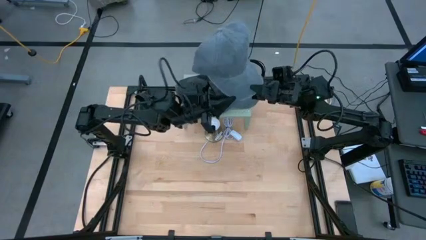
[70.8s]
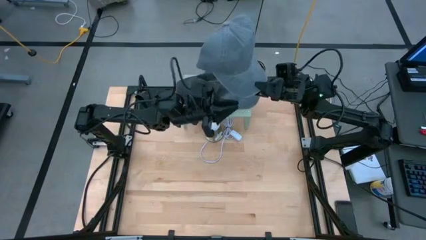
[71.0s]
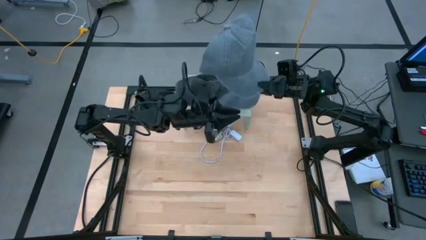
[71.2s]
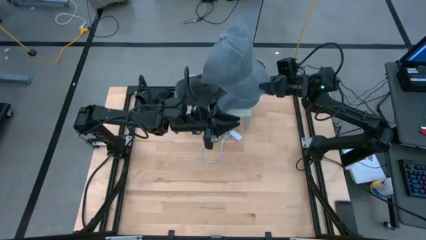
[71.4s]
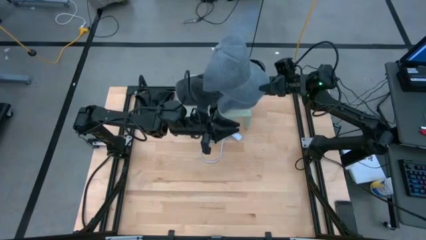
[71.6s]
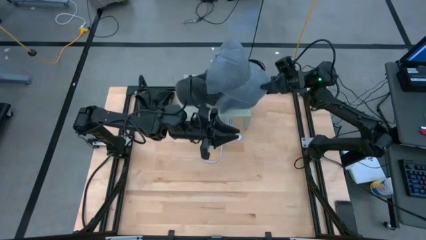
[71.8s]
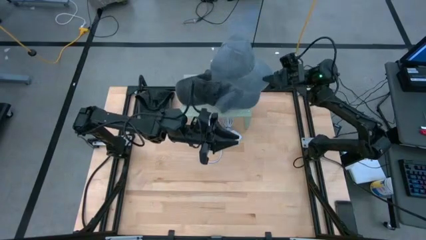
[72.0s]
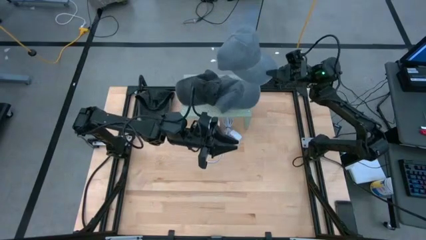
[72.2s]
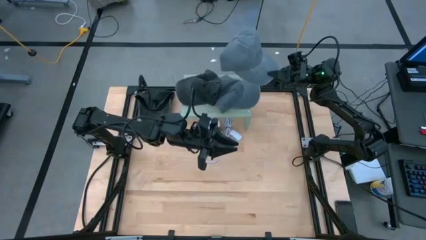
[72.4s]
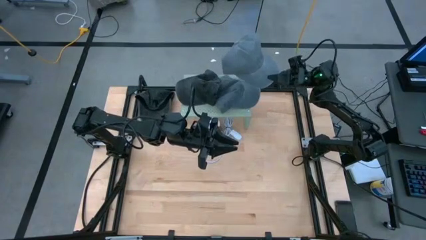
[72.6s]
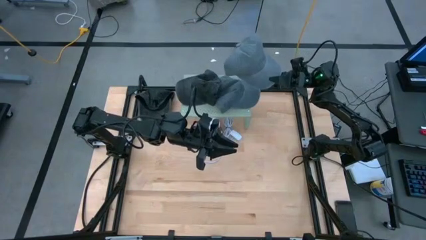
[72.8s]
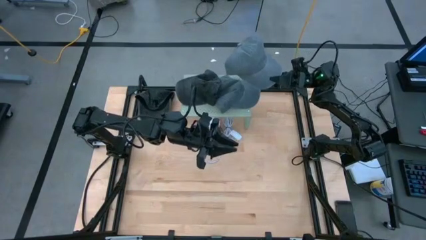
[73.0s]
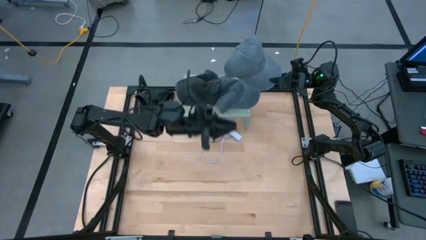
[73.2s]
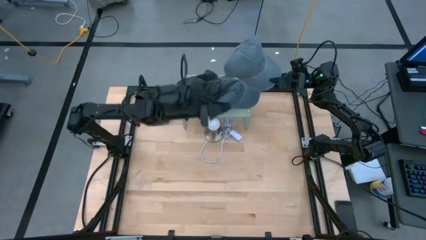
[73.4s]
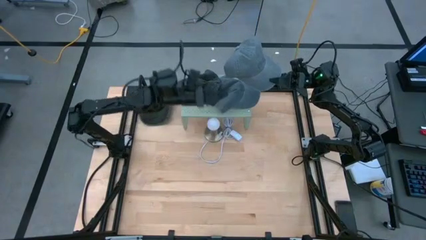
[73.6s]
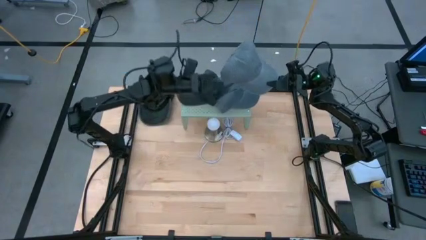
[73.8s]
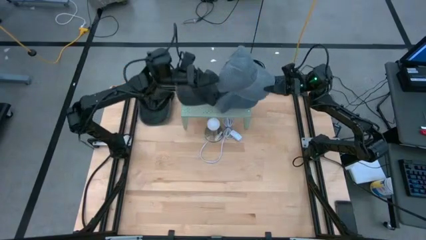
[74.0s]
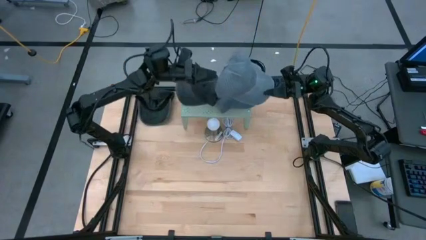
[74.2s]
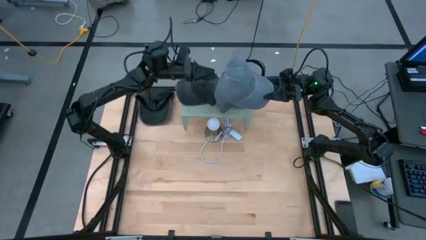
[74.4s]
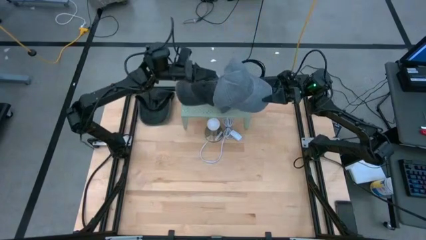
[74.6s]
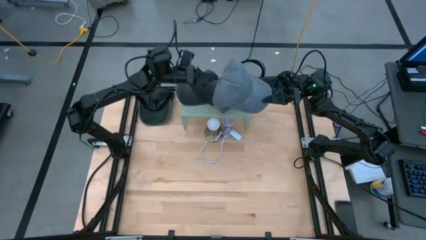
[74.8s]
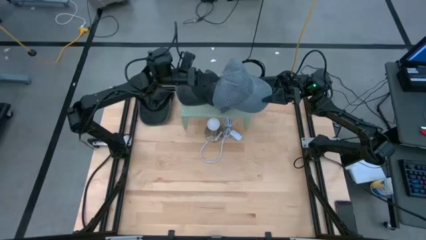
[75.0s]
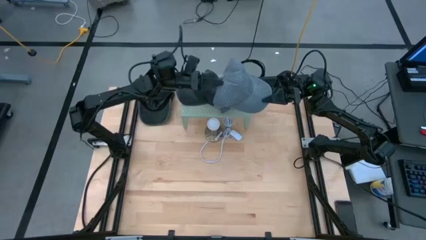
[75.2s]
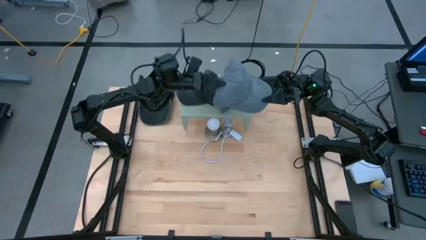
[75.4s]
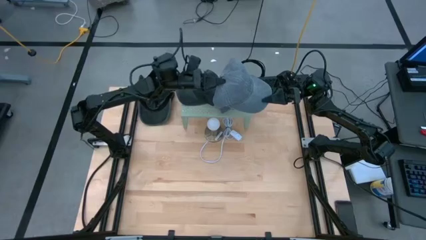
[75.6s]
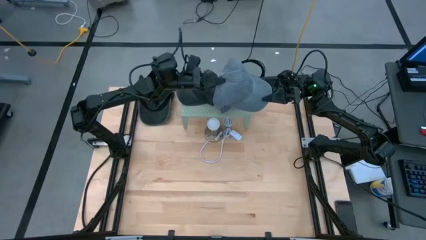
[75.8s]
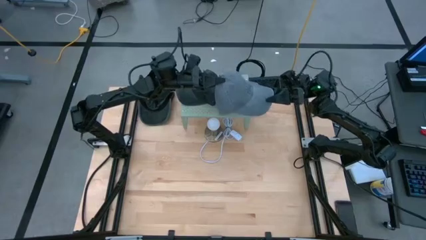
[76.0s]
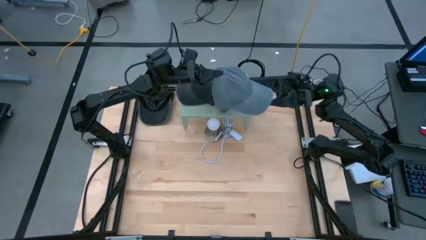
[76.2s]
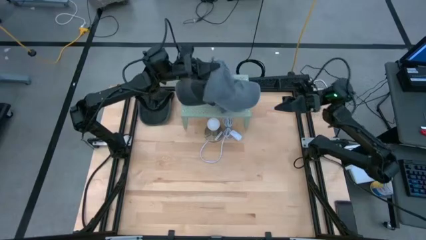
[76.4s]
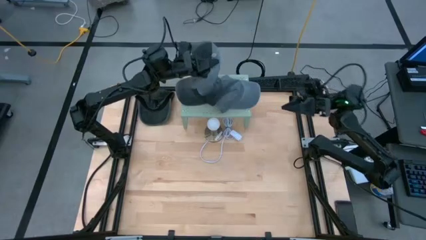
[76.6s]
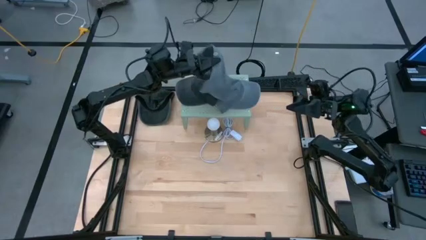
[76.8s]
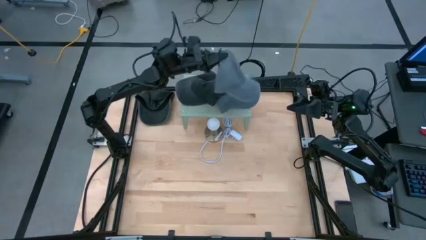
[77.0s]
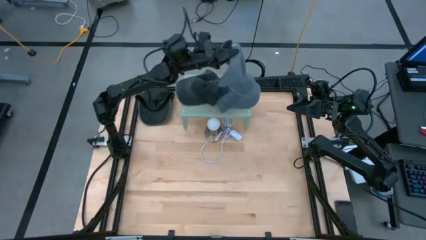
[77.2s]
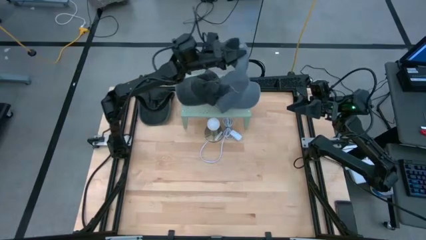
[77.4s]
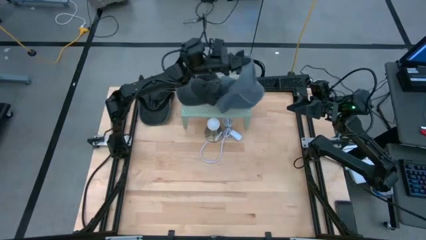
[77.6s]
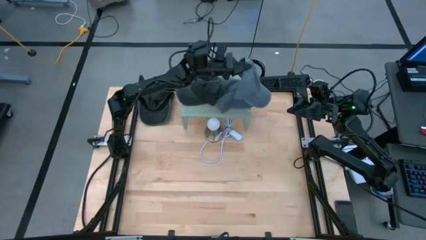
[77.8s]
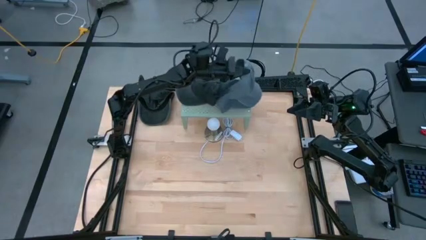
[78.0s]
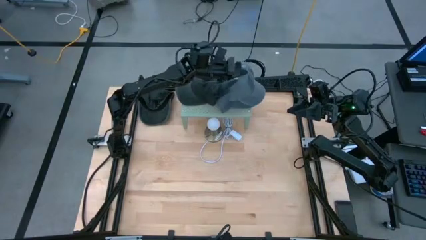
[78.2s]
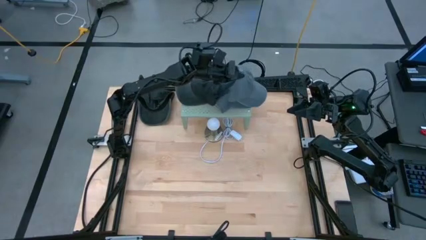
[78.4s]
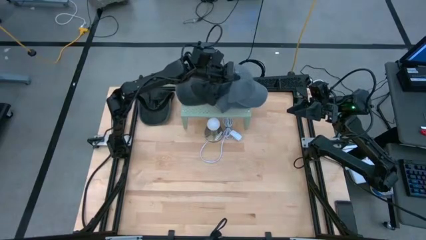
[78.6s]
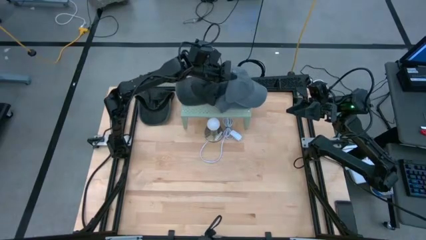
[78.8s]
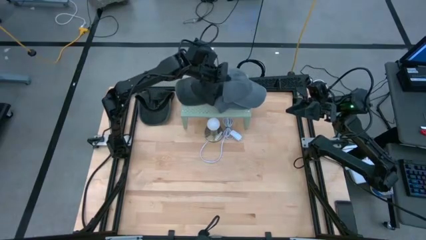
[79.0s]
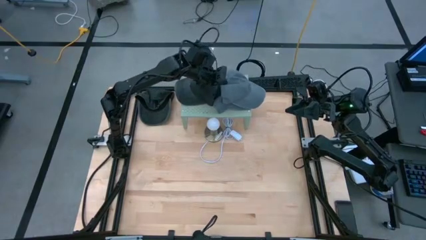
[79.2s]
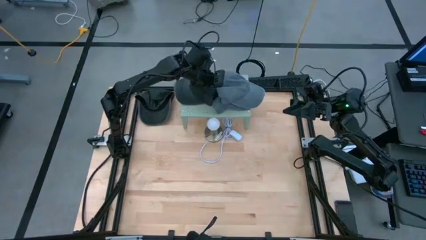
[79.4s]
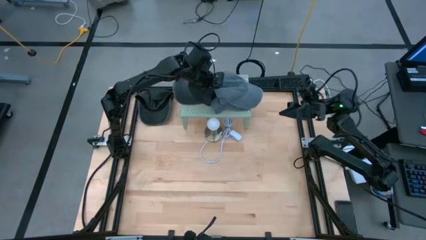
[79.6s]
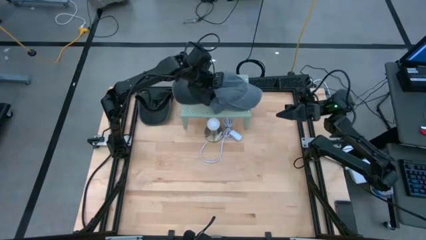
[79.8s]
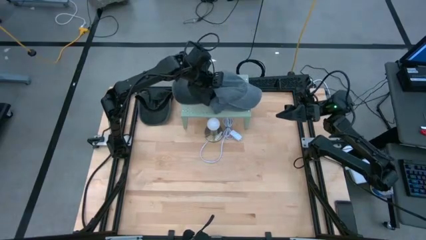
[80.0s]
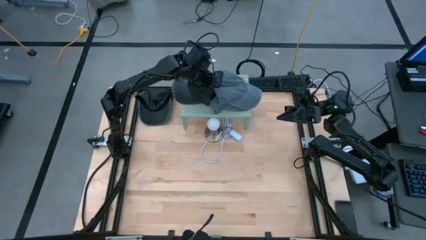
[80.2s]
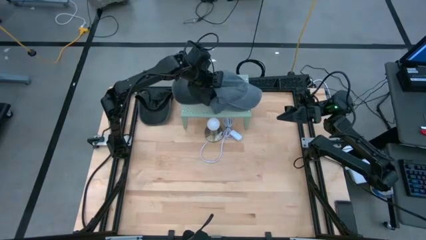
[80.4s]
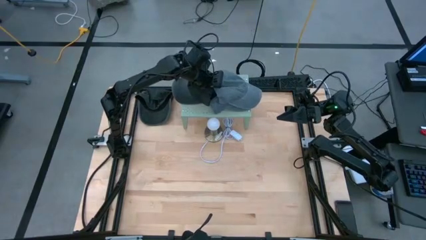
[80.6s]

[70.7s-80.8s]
Task: Pick & Place hat
Stack the gray cap on the other gray cap on the shelf

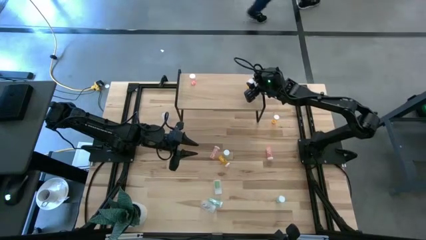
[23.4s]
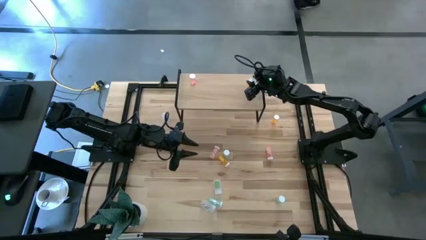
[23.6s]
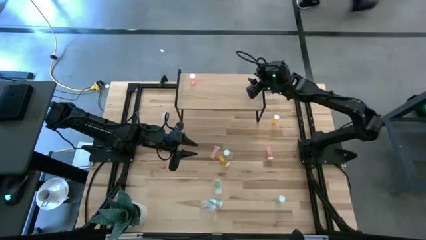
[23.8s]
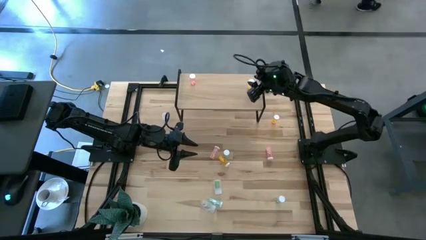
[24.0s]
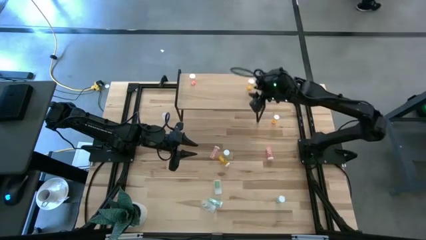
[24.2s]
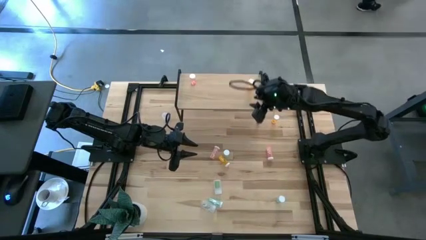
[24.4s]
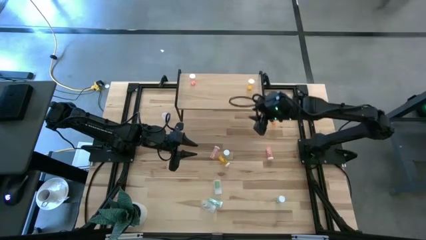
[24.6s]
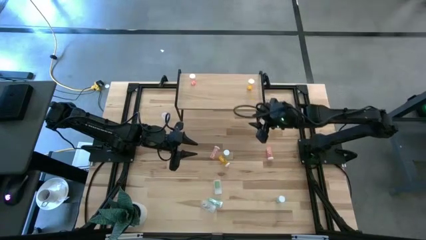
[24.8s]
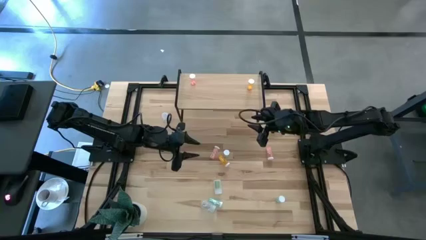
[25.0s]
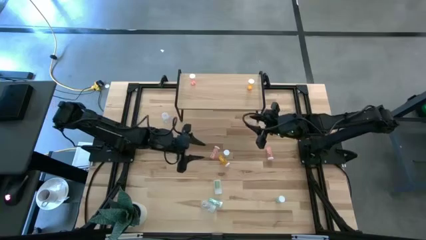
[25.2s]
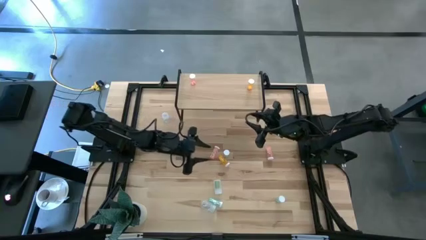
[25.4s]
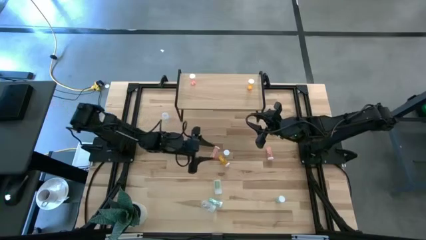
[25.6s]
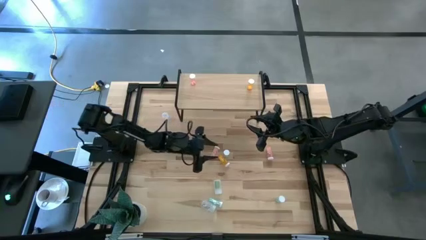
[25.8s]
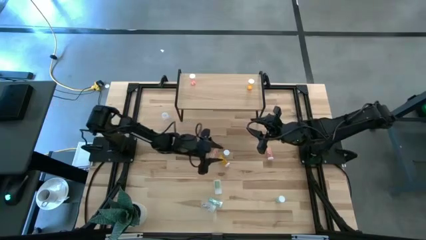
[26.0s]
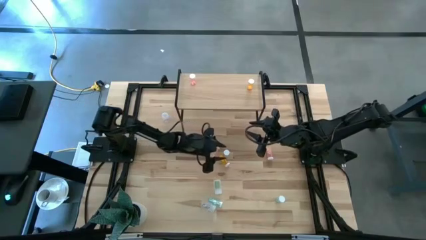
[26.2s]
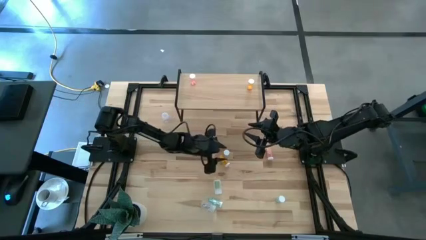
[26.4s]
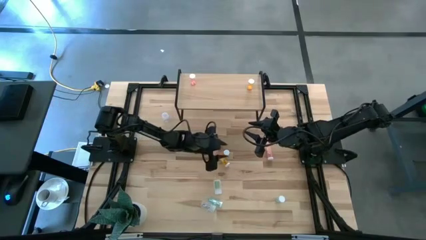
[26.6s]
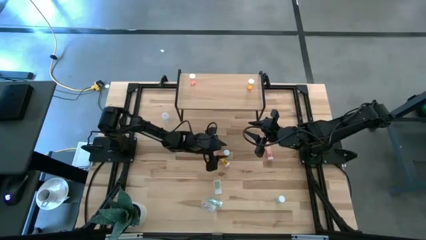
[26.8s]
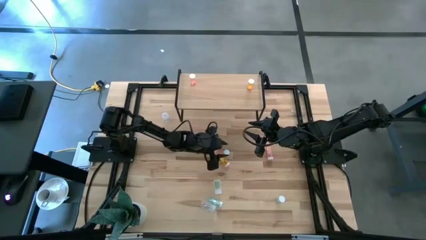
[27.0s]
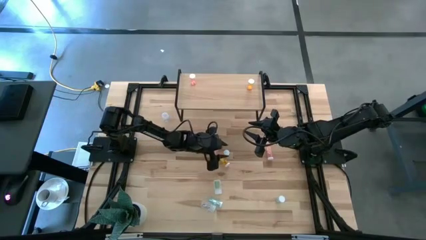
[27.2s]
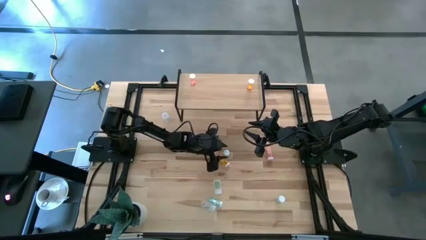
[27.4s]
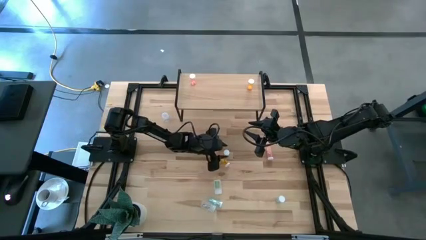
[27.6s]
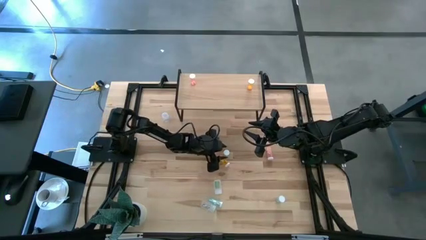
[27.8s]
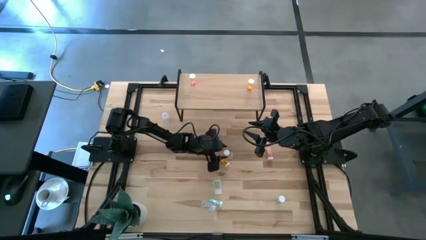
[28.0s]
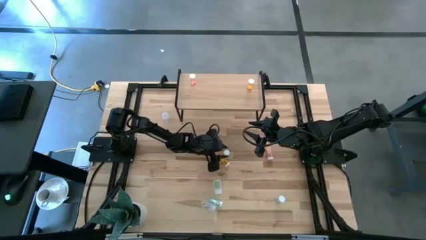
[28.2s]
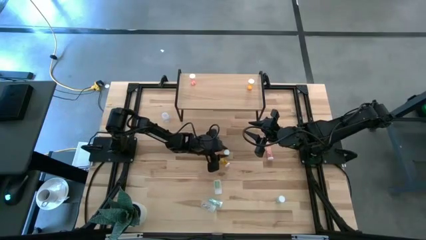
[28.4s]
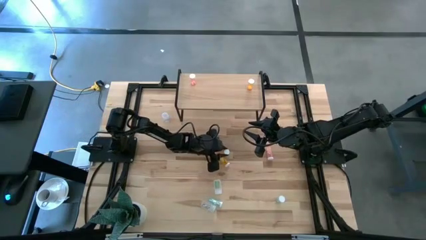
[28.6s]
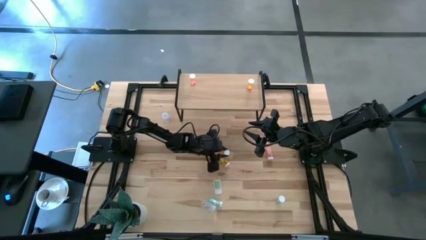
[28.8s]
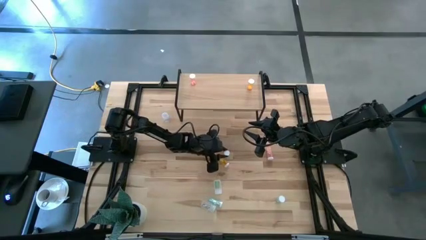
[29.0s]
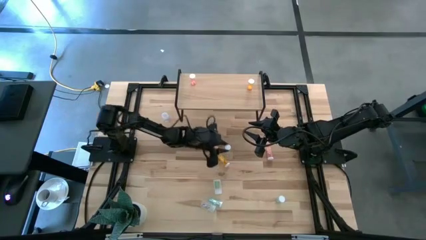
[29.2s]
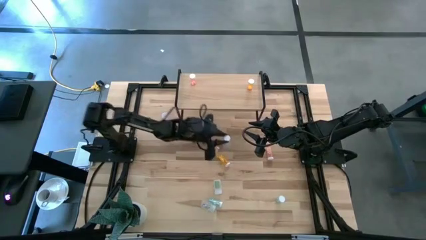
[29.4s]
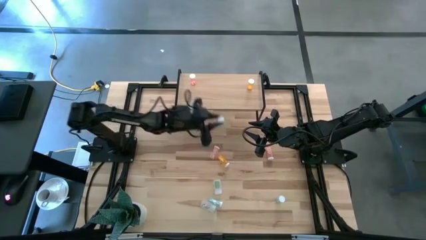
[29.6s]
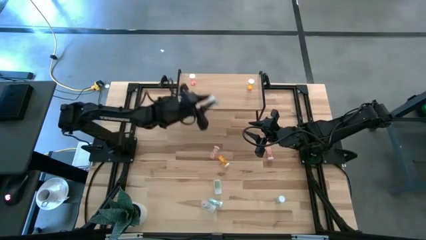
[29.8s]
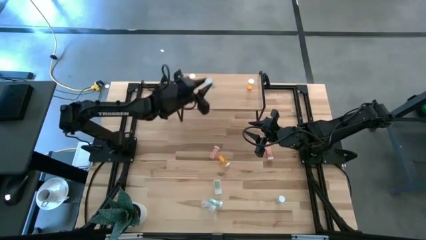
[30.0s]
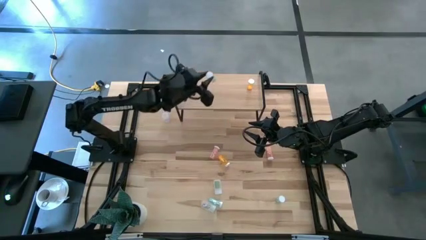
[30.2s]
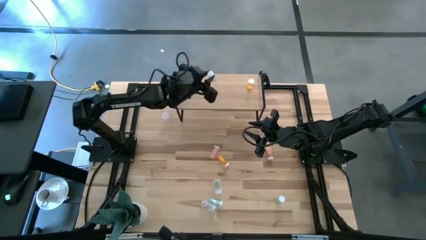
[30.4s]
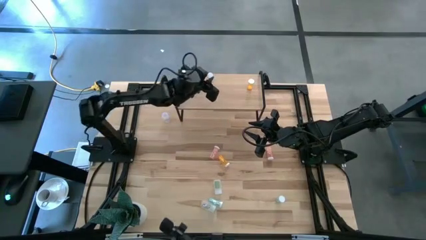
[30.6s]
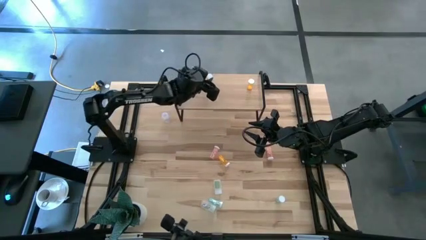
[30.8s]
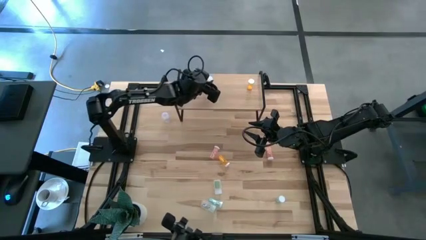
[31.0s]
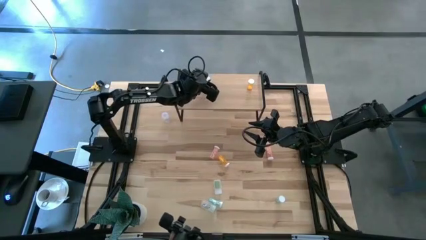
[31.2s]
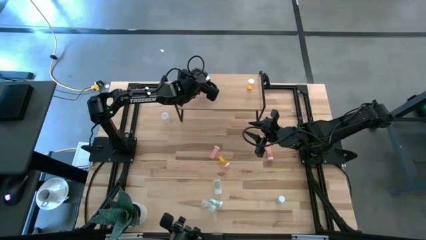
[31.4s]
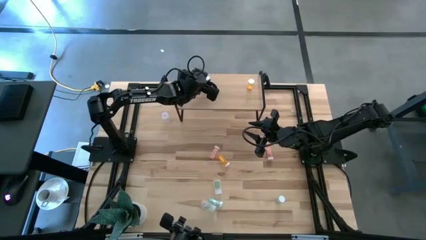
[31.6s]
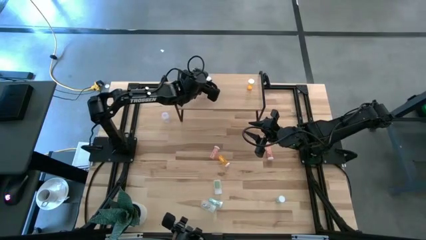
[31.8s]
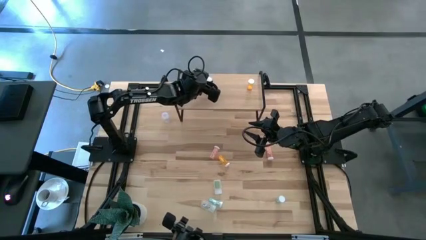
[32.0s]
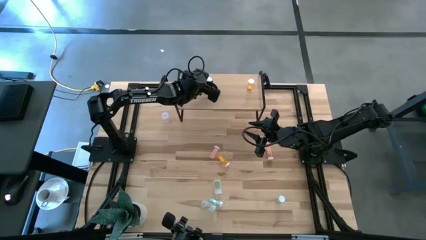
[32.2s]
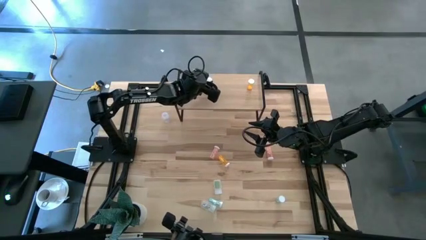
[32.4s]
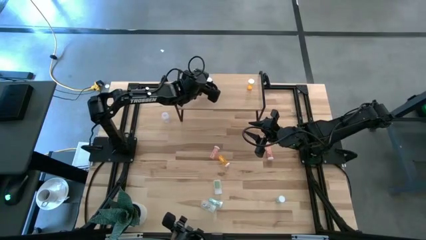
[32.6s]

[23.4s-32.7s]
Task: Pick and place medicine bottles onto shelf by color
Put the top green pill bottle on the shelf
